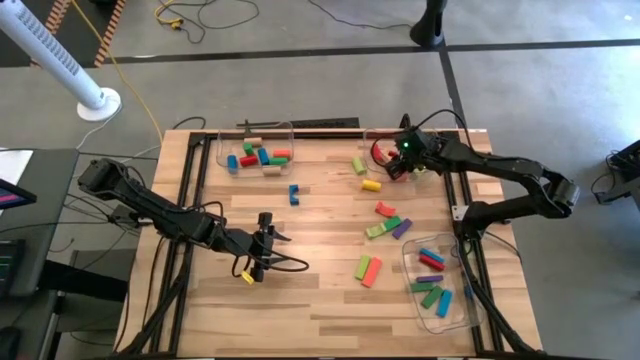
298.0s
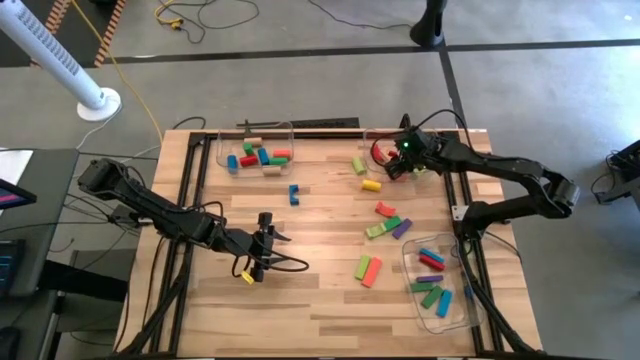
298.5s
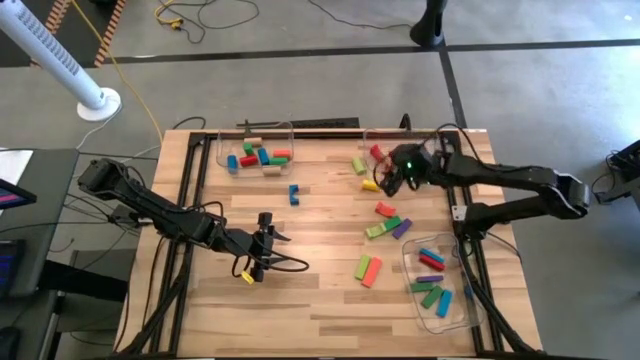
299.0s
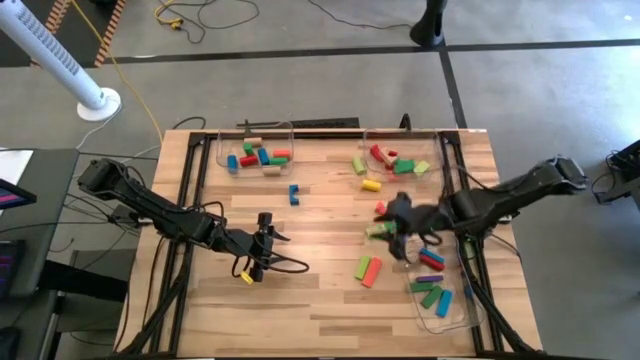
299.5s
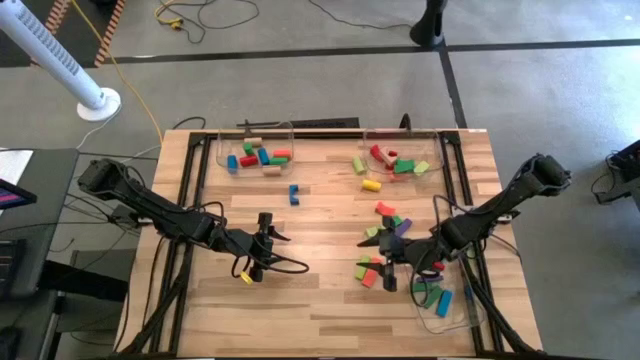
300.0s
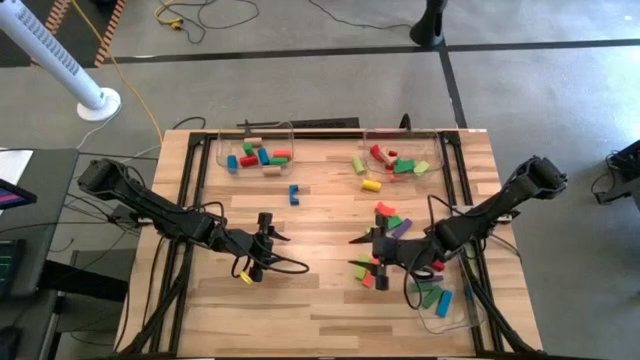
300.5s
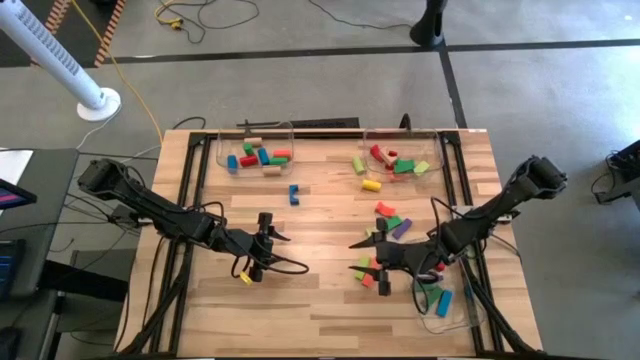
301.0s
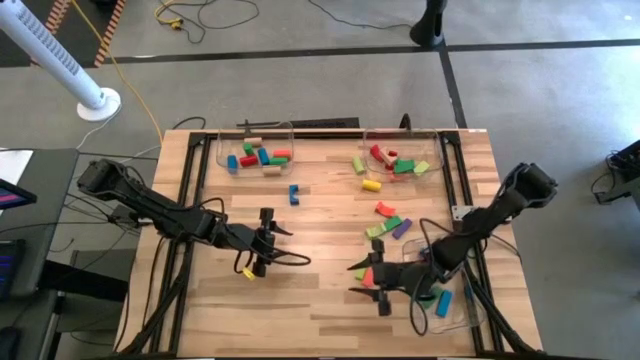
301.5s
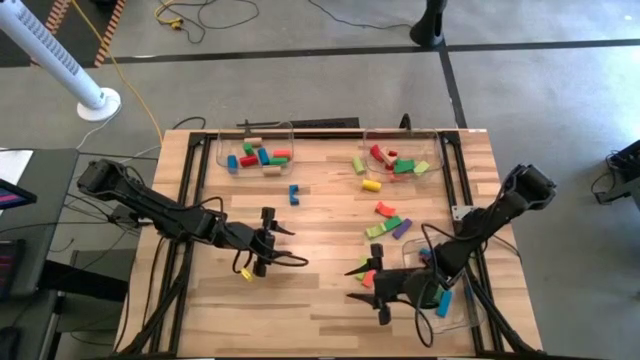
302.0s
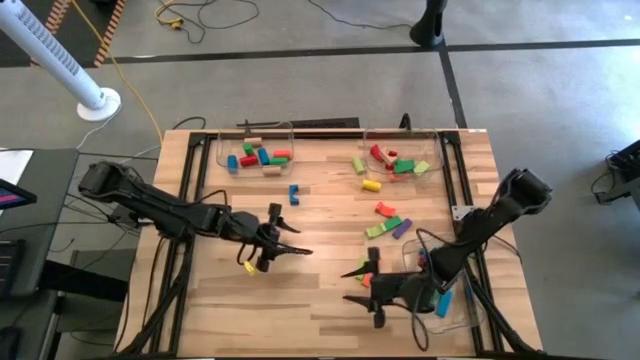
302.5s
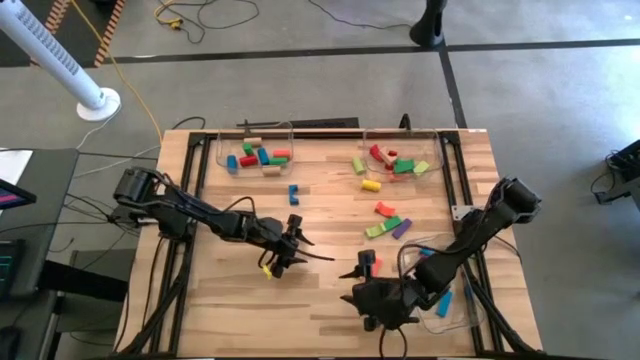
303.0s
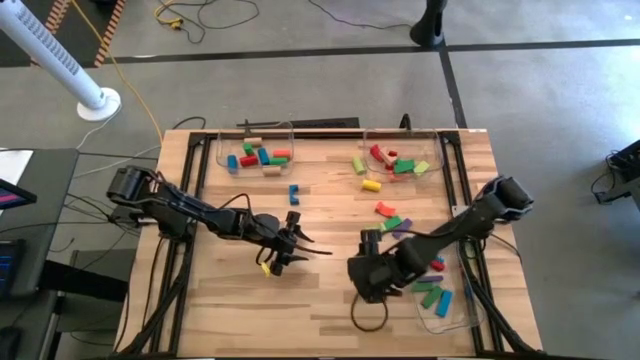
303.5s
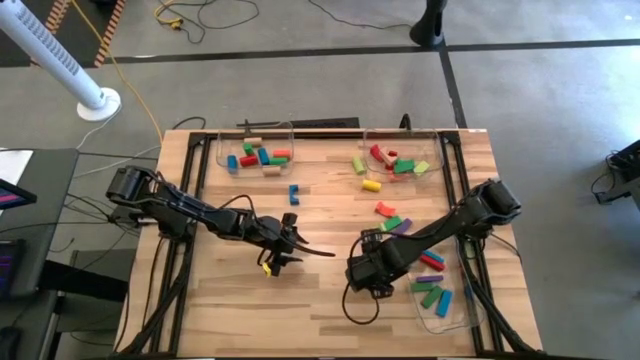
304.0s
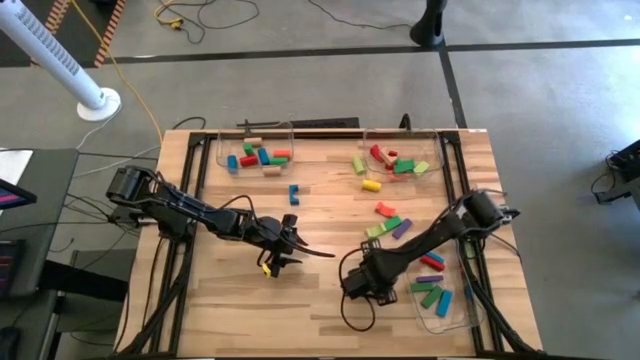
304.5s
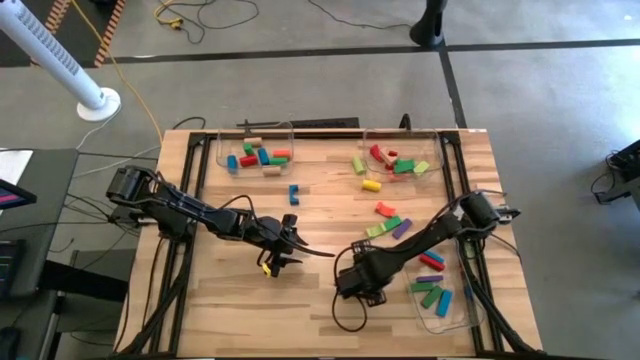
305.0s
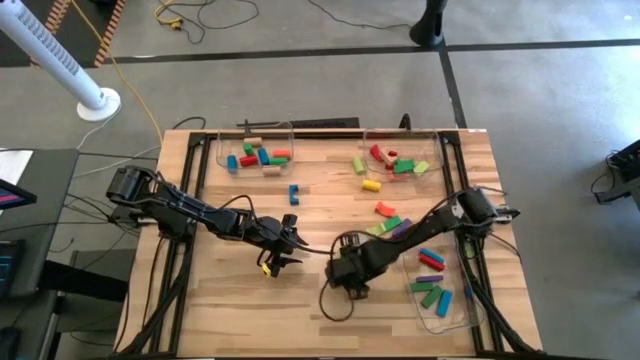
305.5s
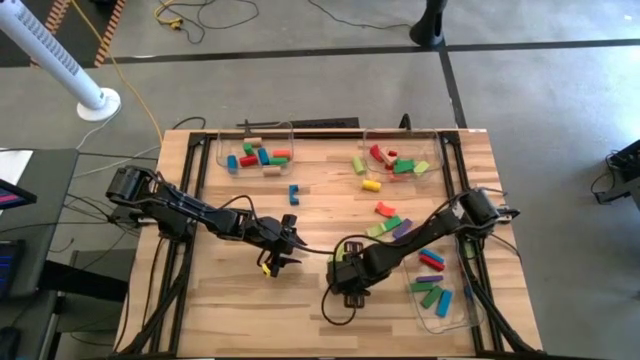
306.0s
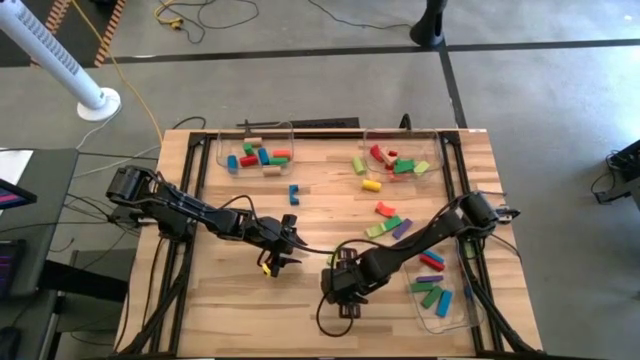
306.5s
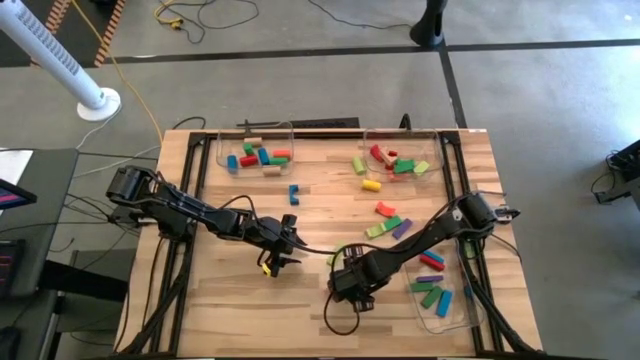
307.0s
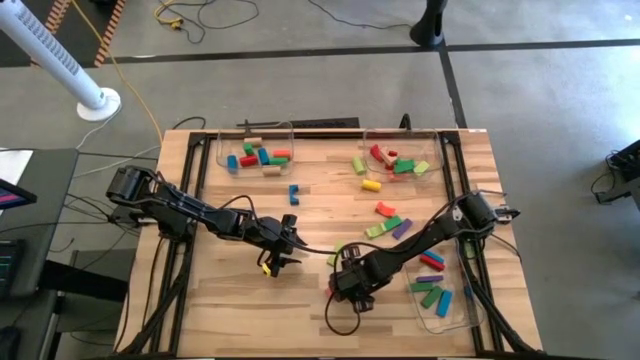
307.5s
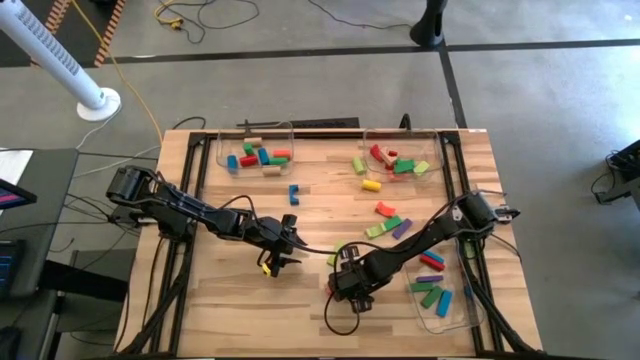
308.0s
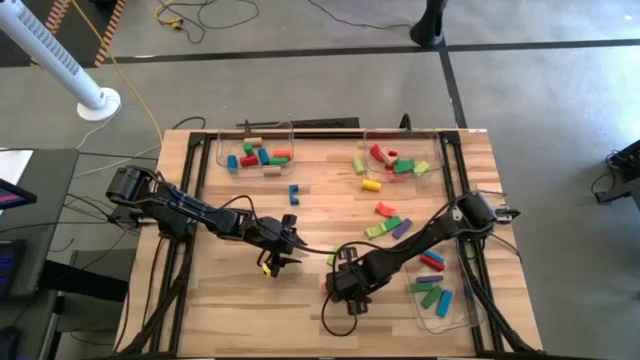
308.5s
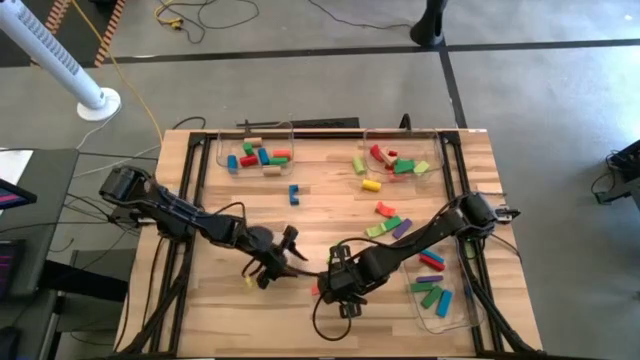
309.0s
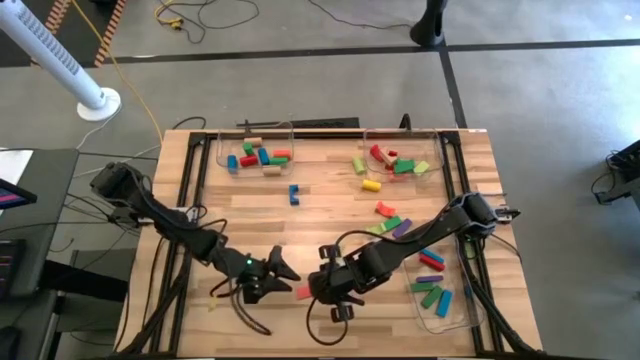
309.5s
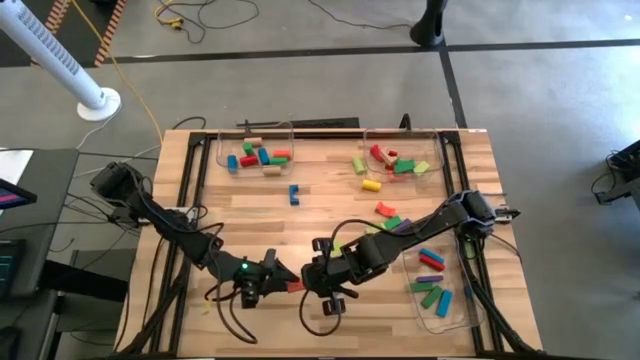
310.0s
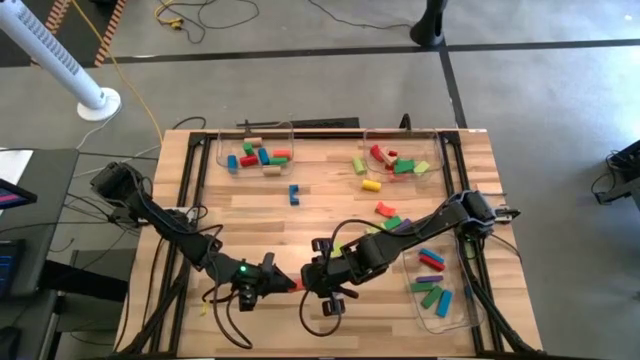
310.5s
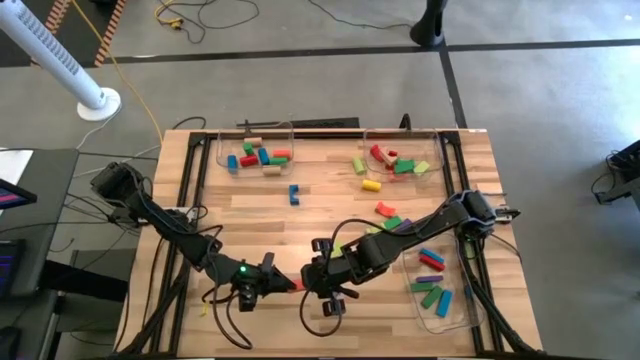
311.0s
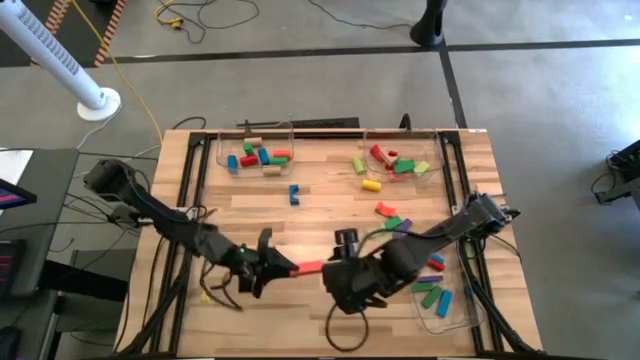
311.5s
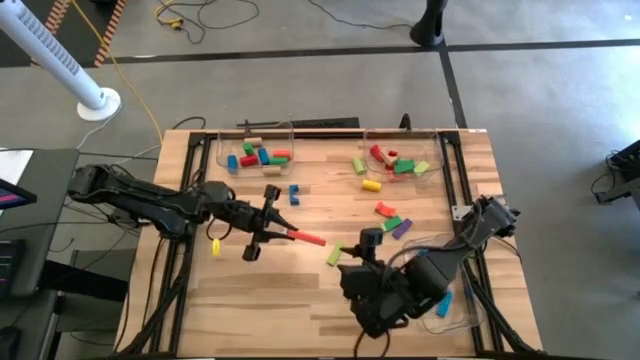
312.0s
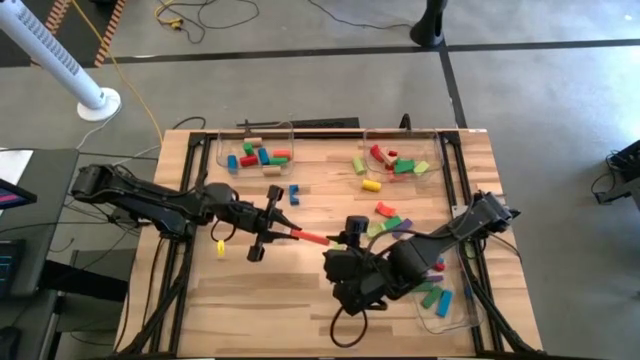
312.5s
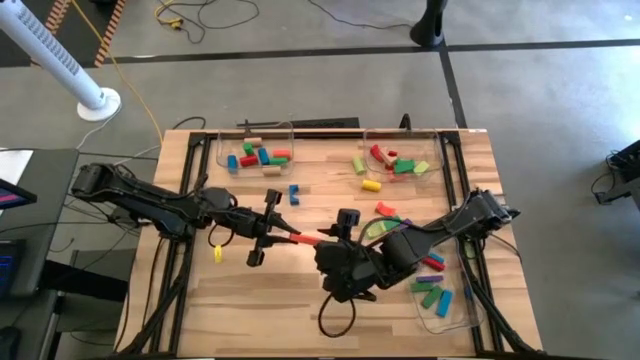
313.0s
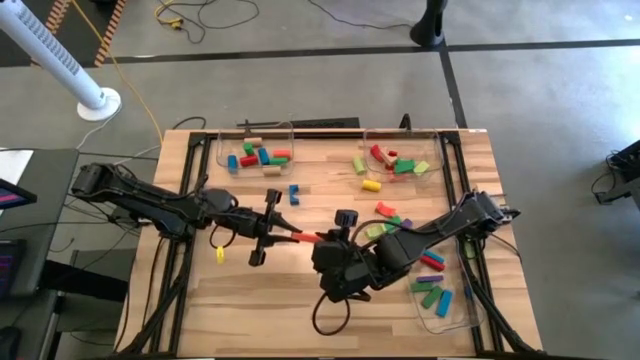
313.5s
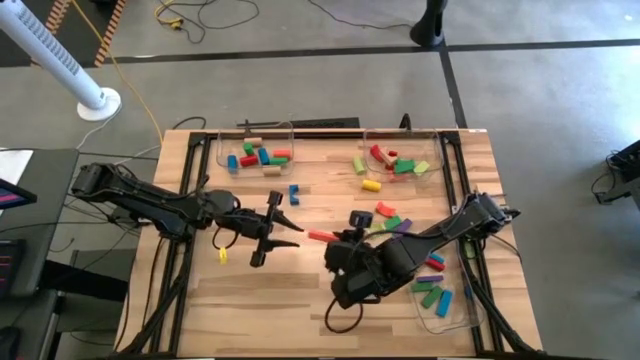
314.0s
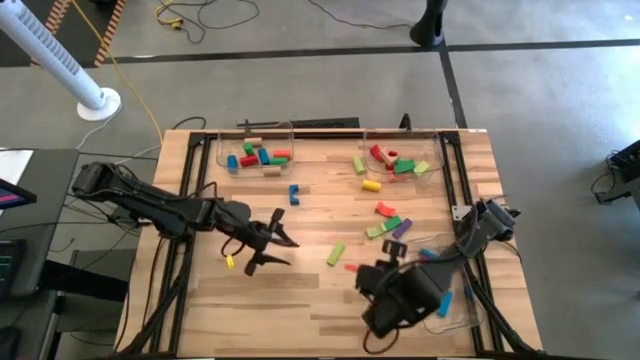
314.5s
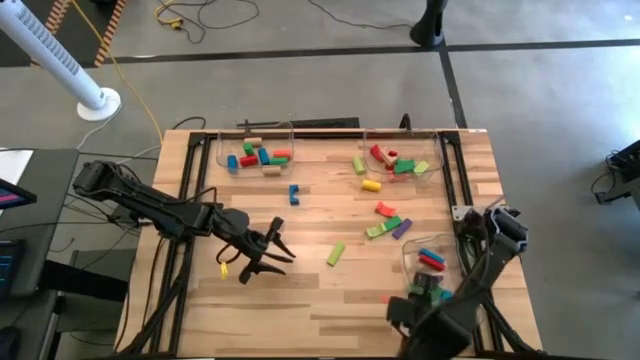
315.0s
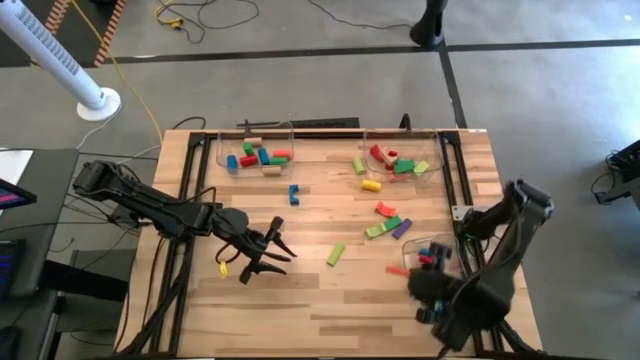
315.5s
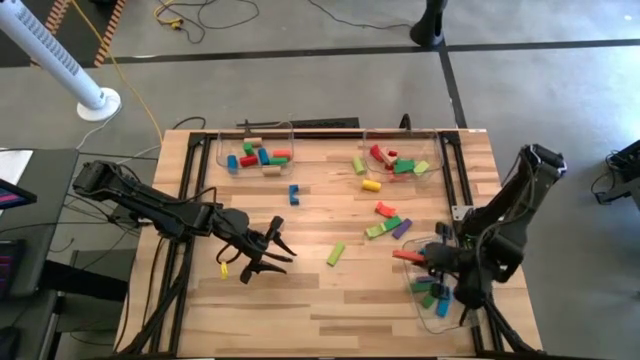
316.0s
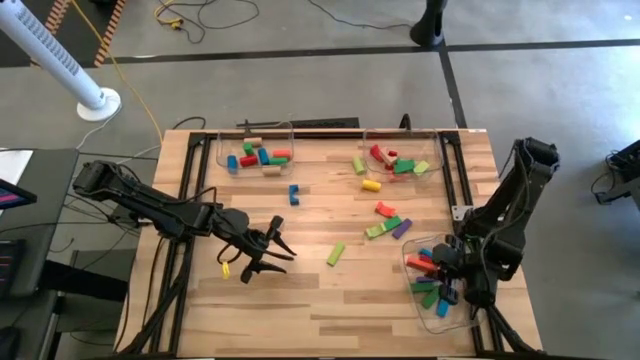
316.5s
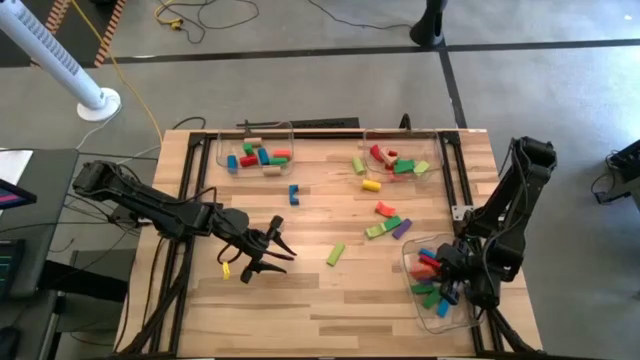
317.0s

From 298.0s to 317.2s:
Task: Sort blocks by size
Put the orange rectangular block into the bottom transparent bin

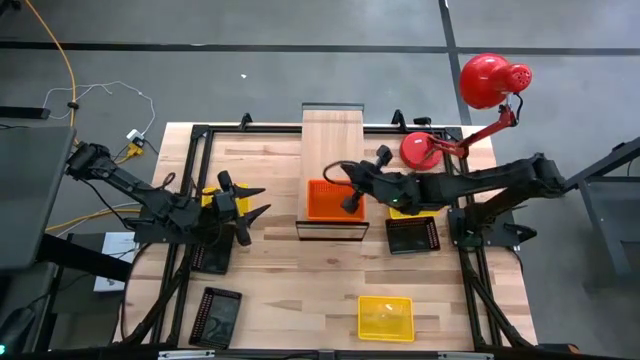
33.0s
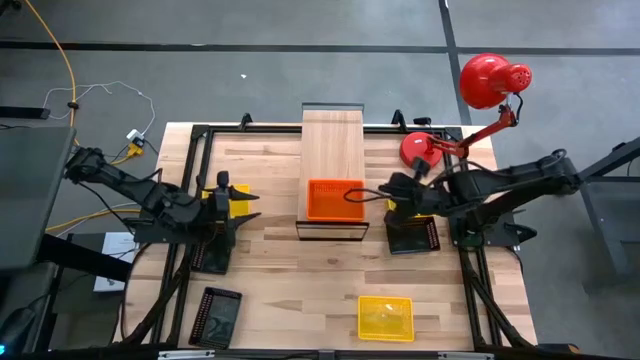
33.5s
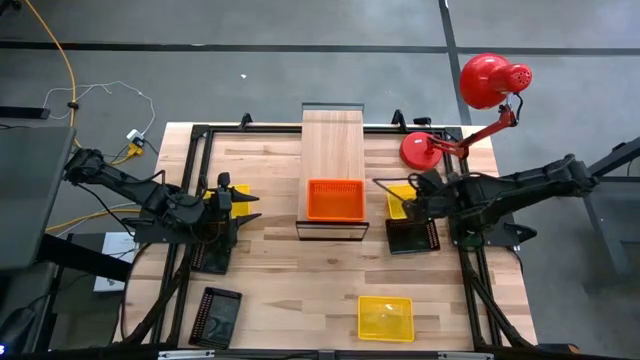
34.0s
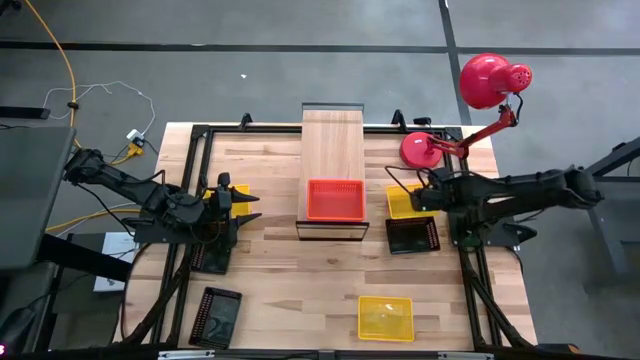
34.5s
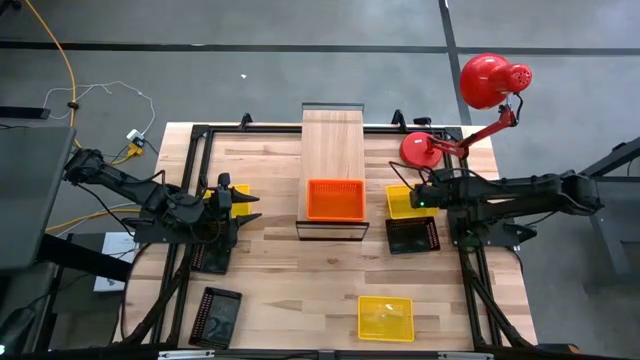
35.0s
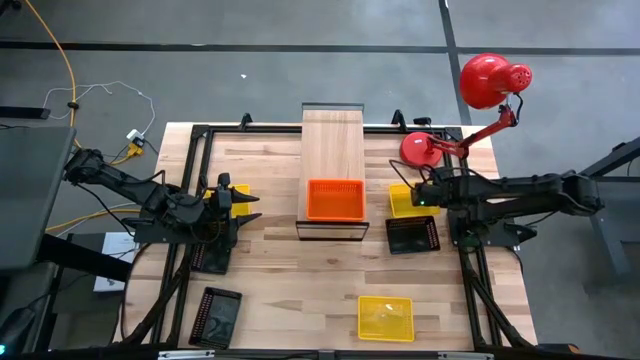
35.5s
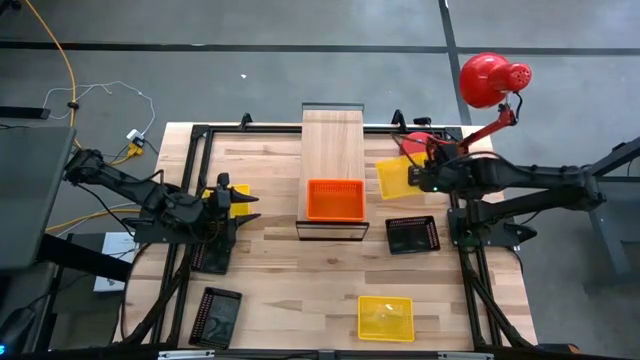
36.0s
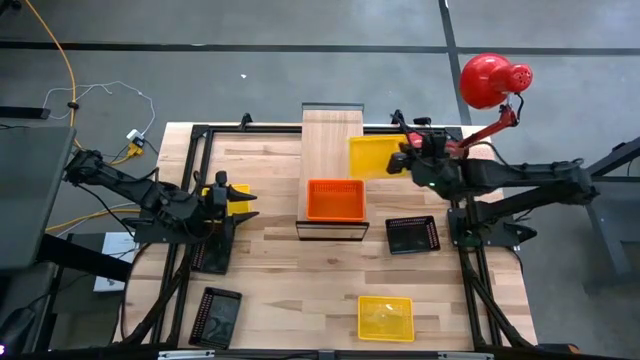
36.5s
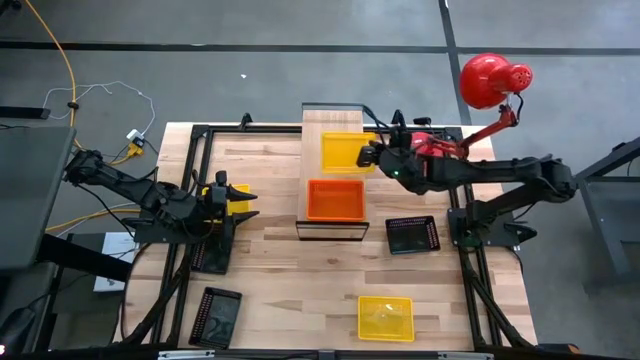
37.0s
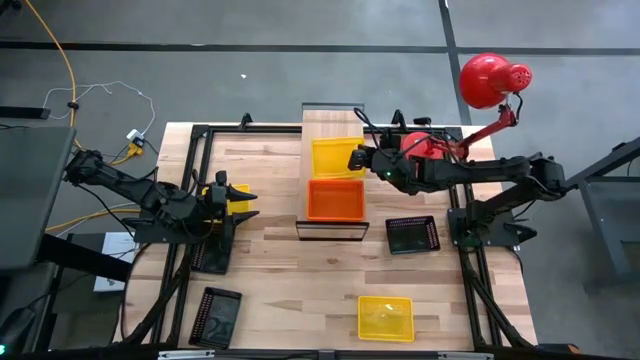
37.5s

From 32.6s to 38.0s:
Task: Stack baskets on shelf by color
Put the top right yellow bin on the shelf
